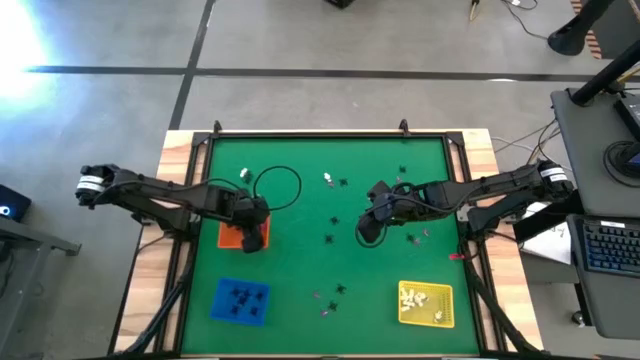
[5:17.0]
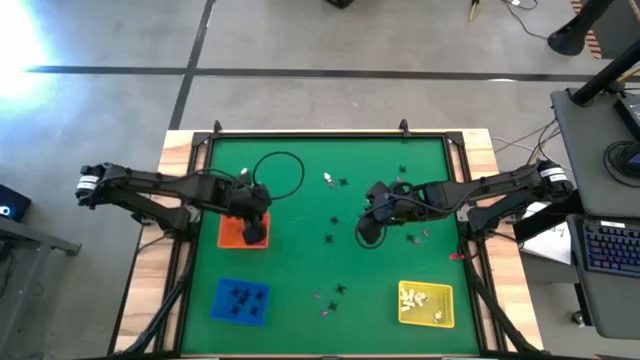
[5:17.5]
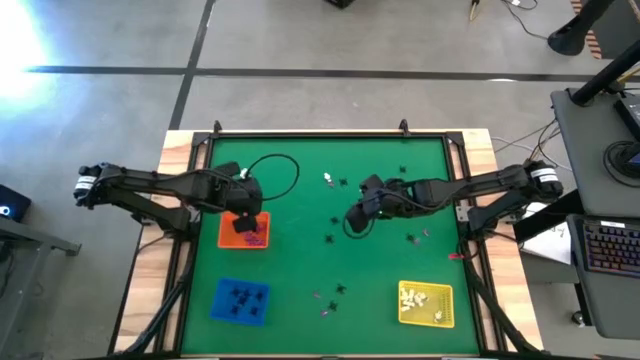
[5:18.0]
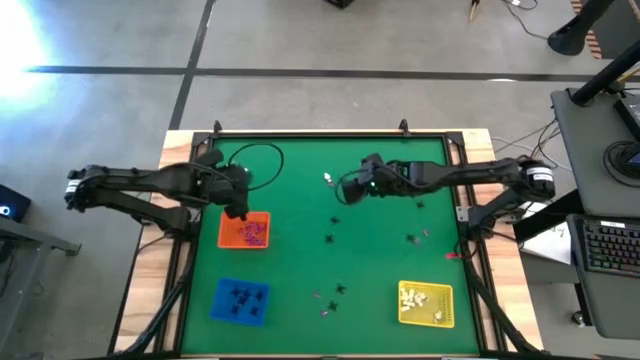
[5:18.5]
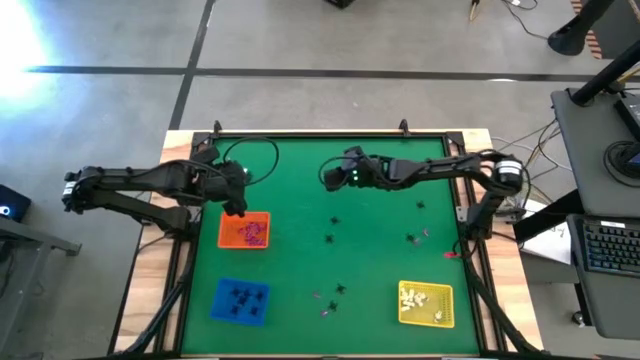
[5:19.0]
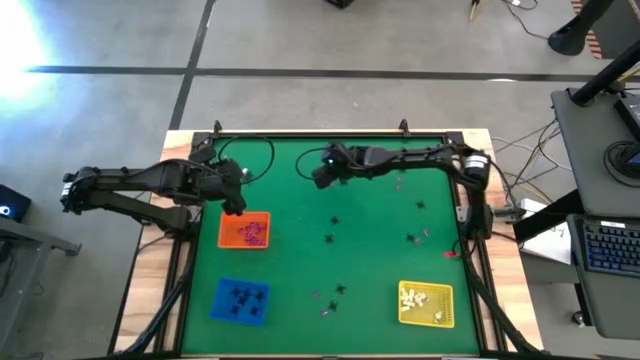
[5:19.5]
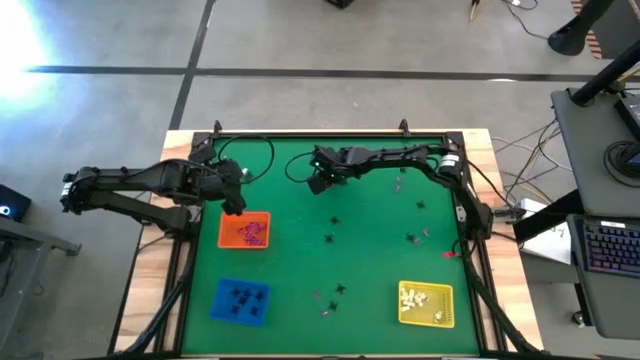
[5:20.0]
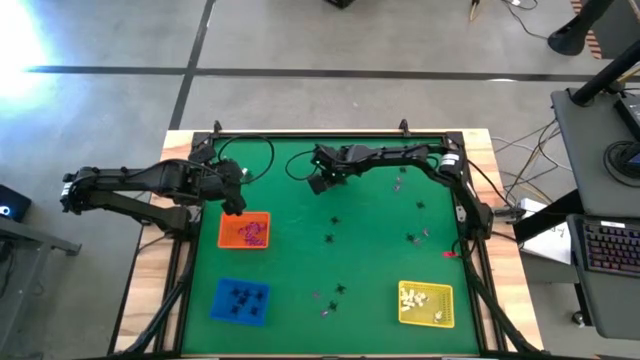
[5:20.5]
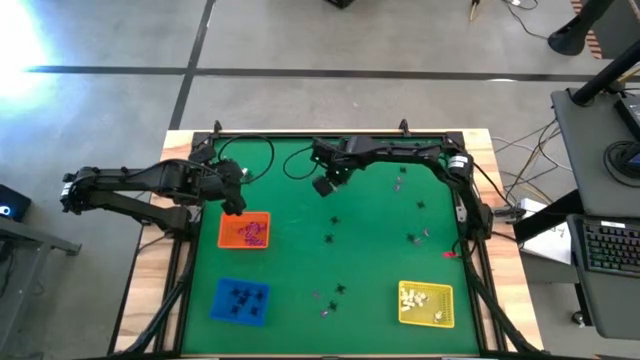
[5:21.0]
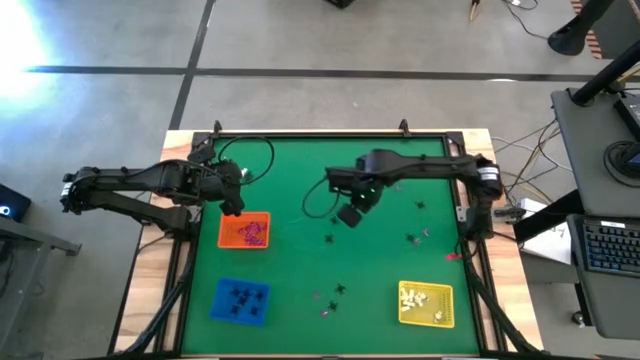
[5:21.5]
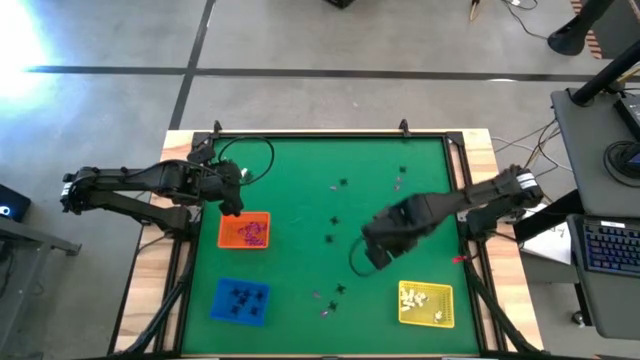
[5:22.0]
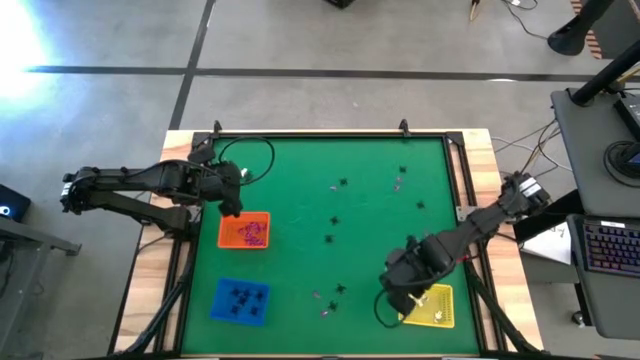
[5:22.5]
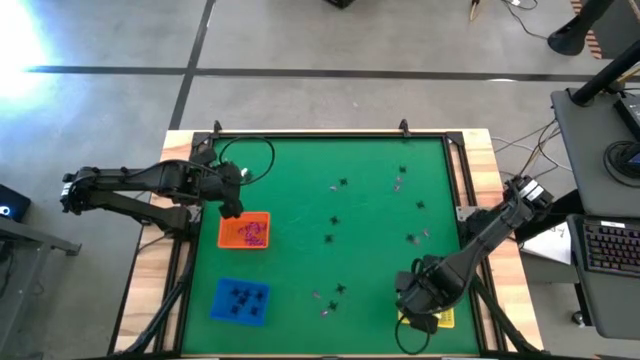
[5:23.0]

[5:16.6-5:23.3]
Task: Sort Halloween decoration
Put the white skeleton toy into the yellow bin

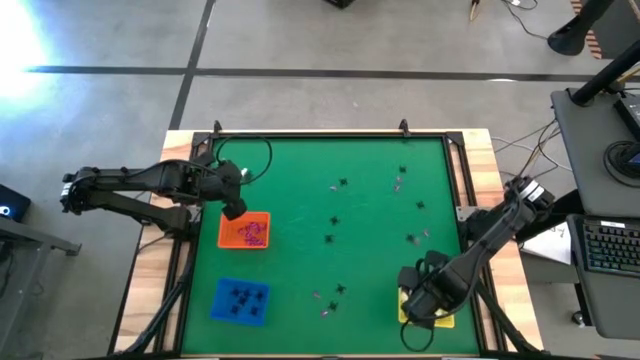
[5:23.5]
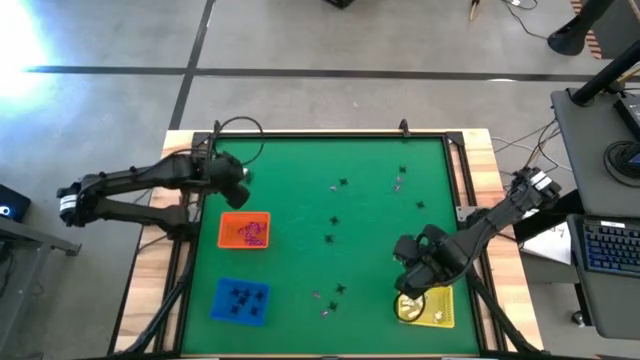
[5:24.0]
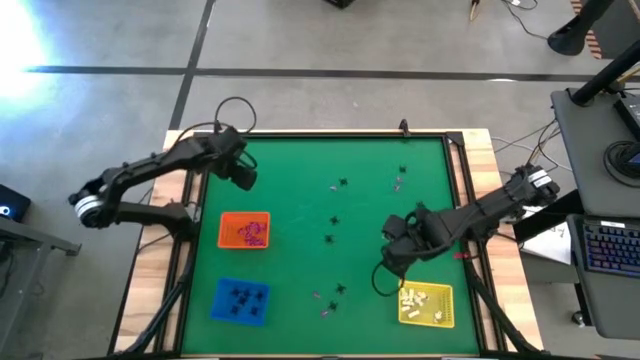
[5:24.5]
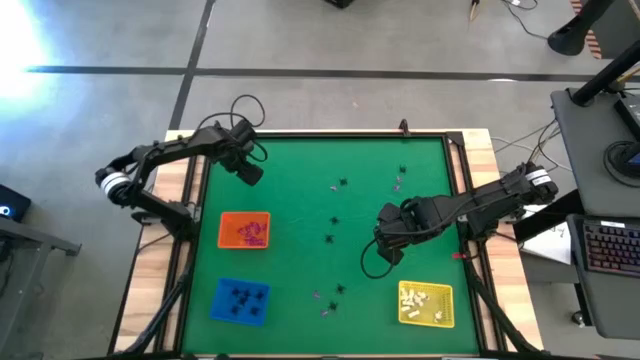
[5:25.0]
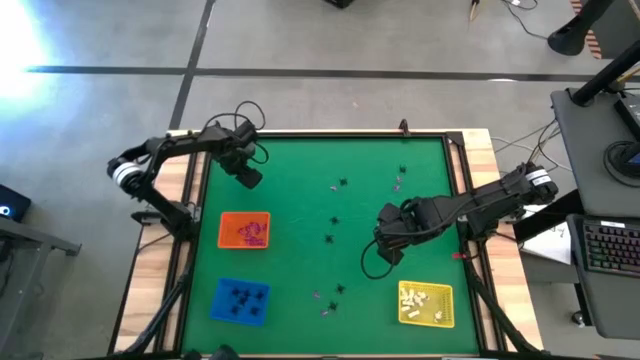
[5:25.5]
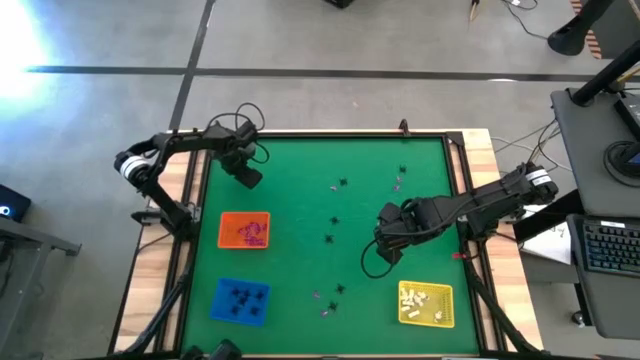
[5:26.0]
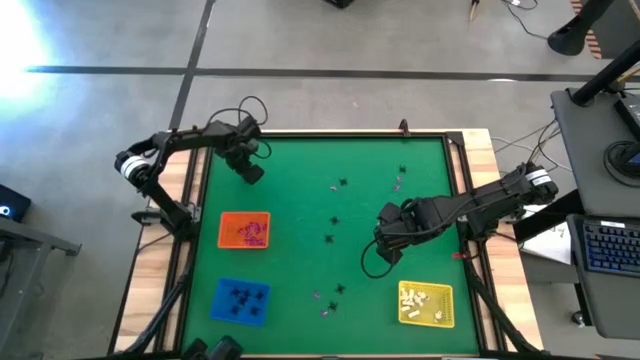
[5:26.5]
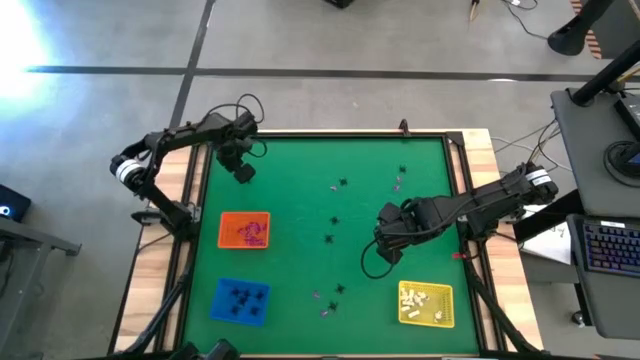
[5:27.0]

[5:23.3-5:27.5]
Put the white skeleton toy into the yellow bin

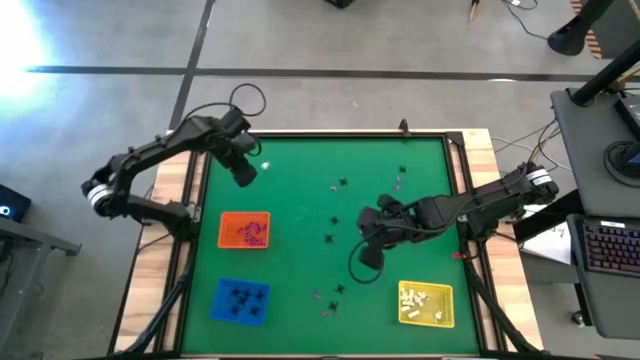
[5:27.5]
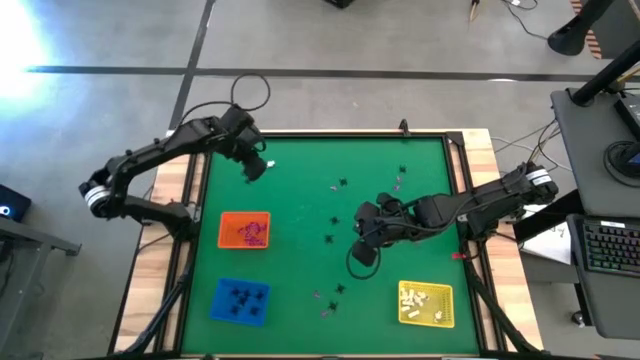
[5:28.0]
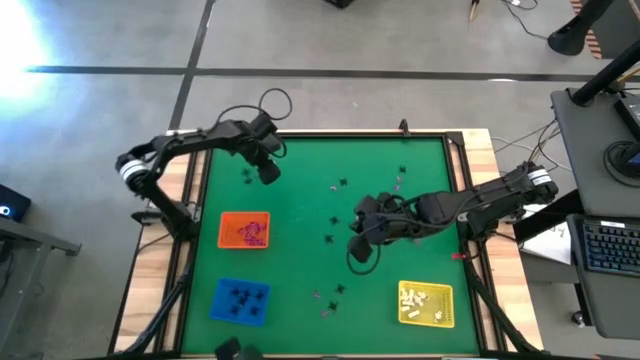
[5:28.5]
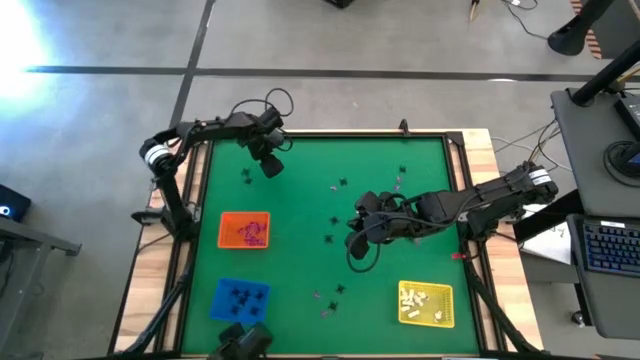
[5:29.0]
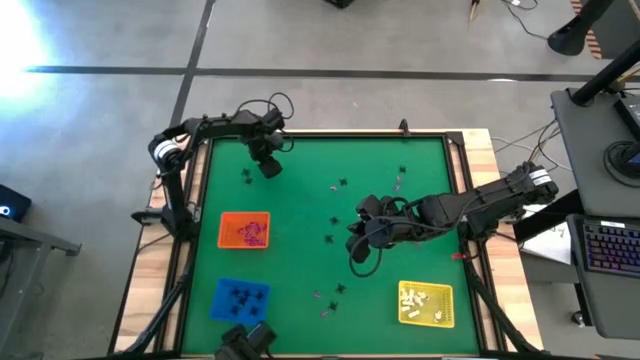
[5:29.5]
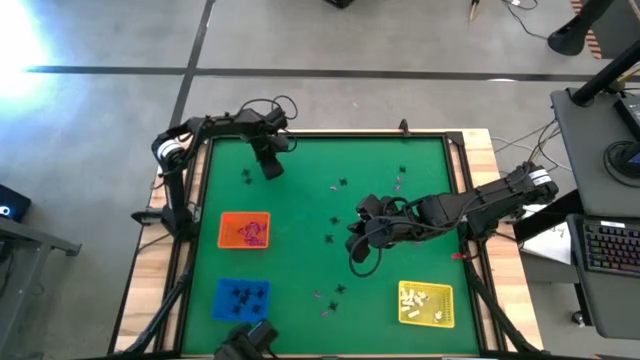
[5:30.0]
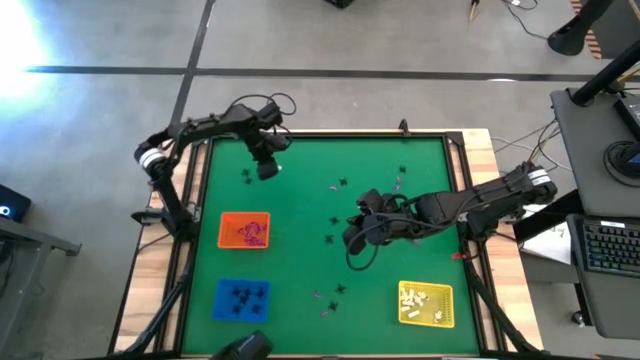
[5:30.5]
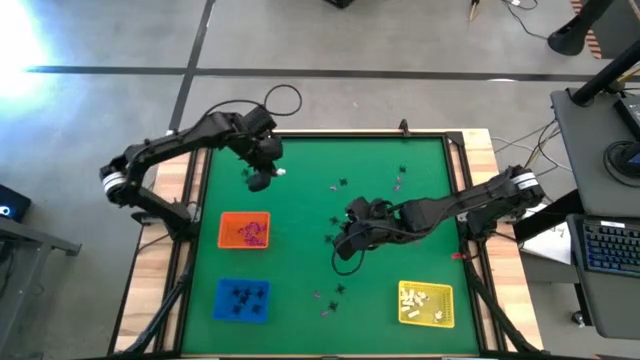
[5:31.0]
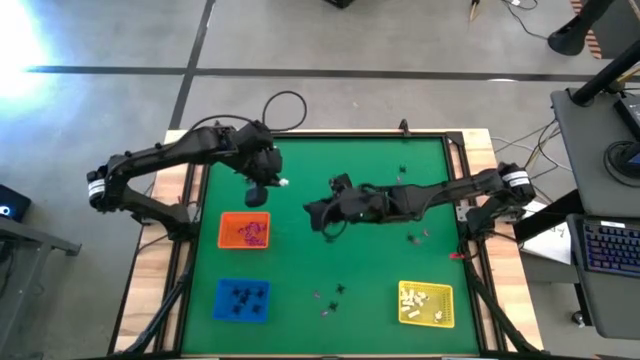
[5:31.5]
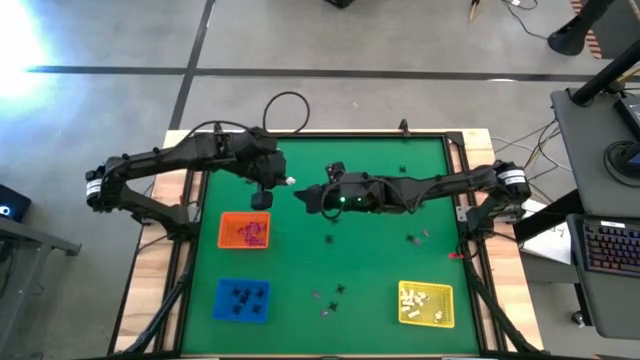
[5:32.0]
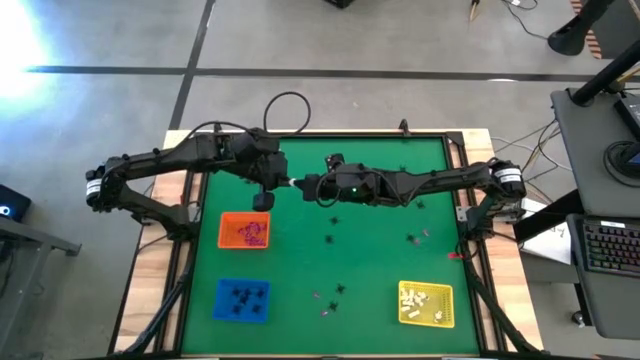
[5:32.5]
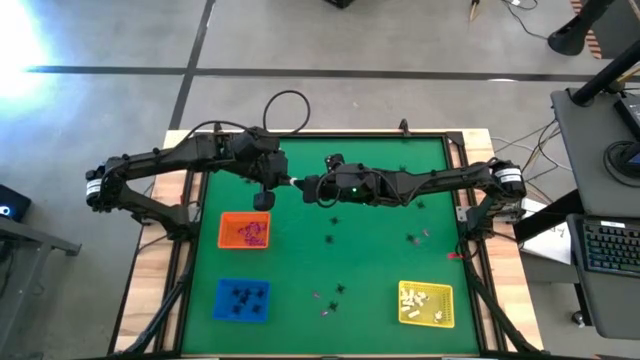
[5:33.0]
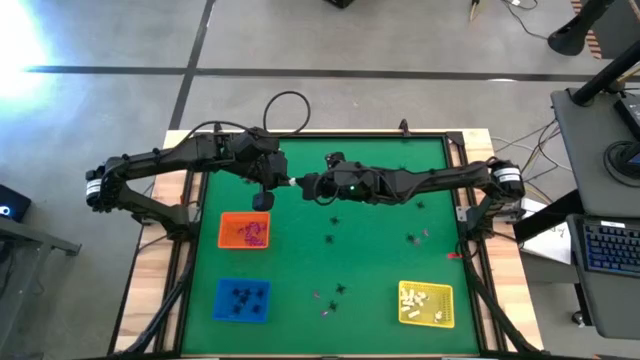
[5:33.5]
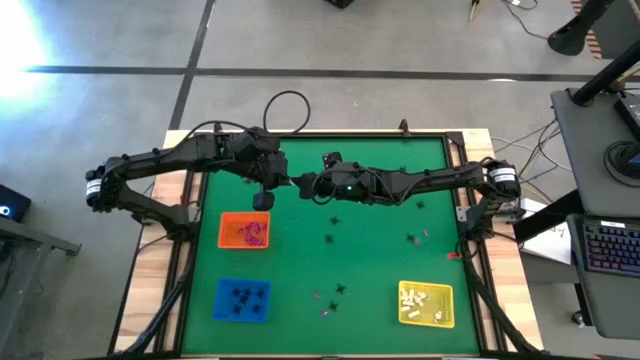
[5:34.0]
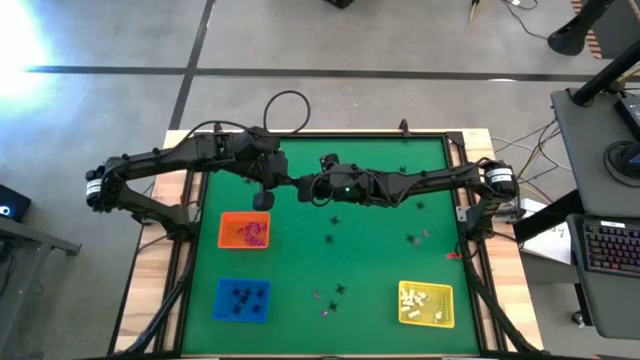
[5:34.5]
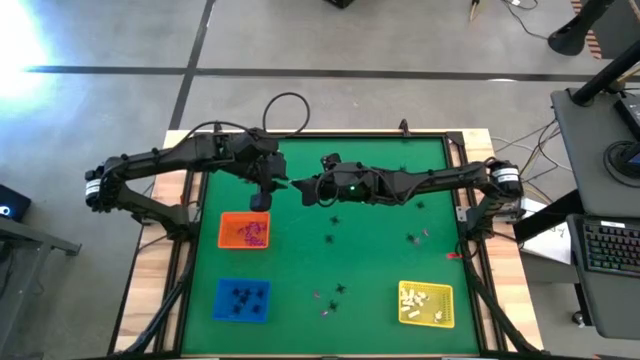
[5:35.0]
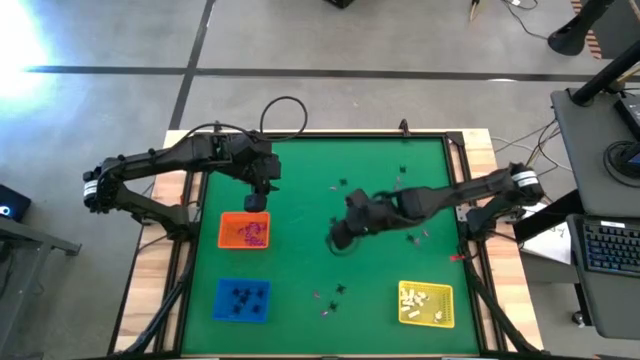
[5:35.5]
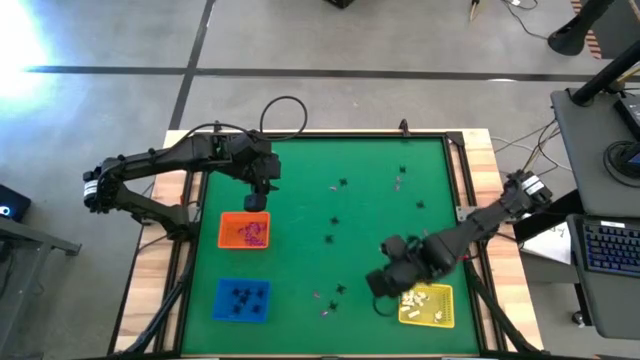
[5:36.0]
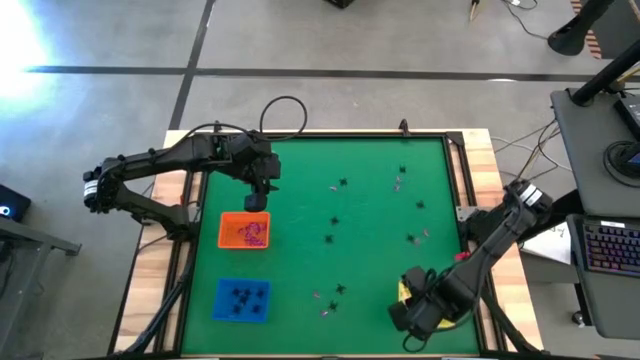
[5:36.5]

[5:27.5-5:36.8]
Put the white skeleton toy into the yellow bin

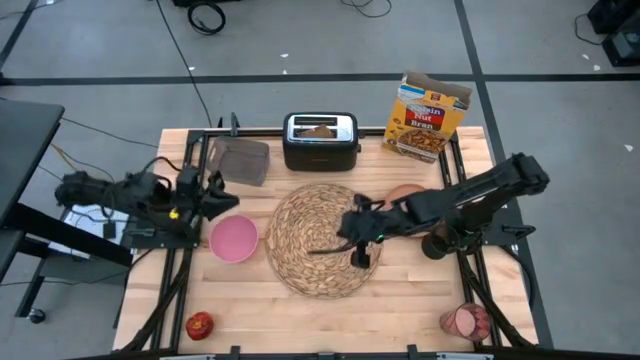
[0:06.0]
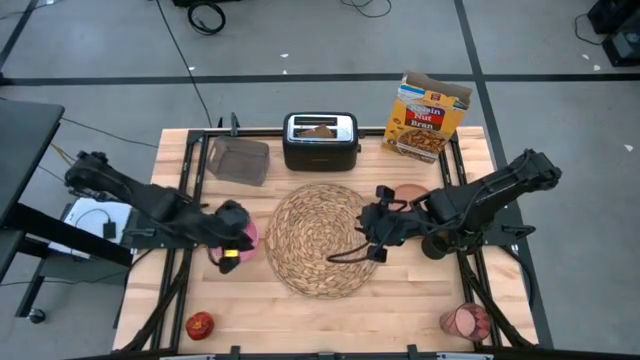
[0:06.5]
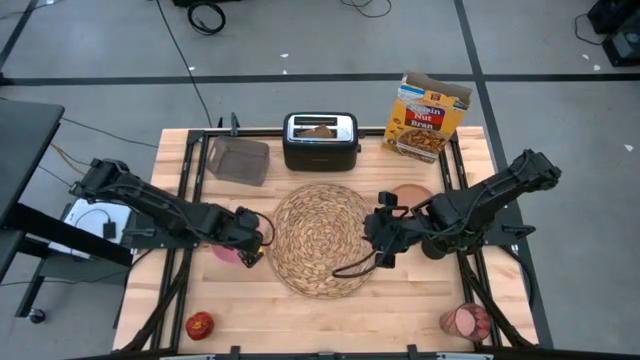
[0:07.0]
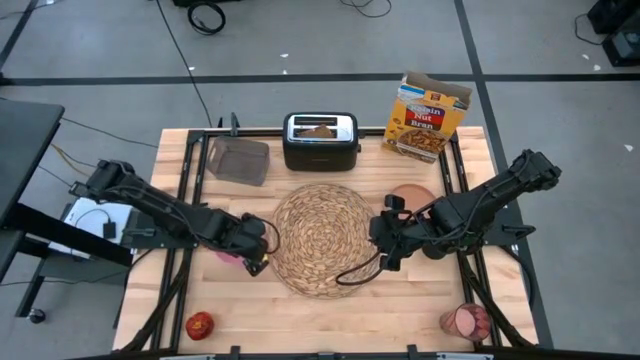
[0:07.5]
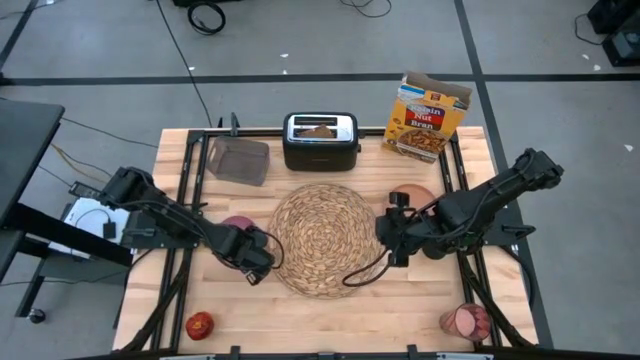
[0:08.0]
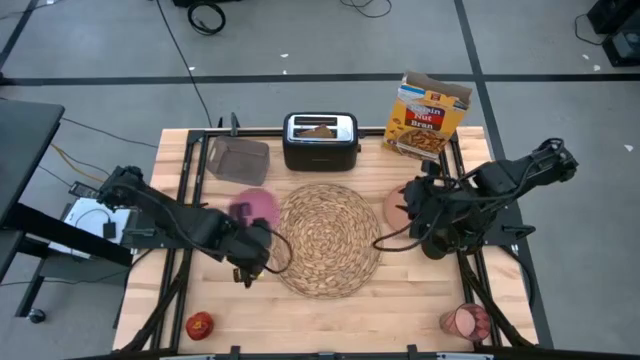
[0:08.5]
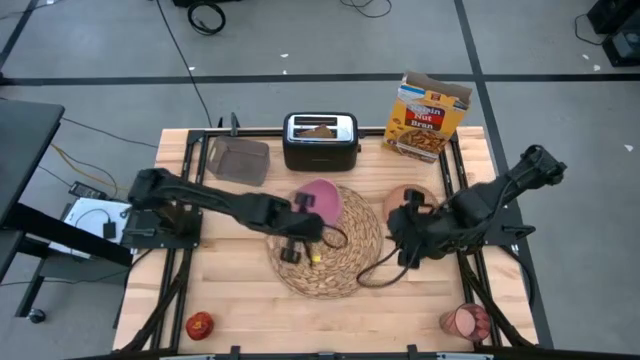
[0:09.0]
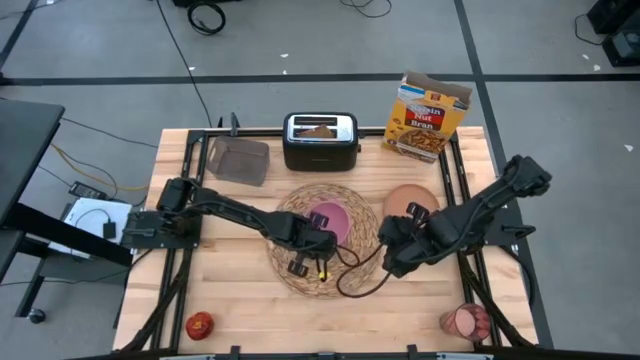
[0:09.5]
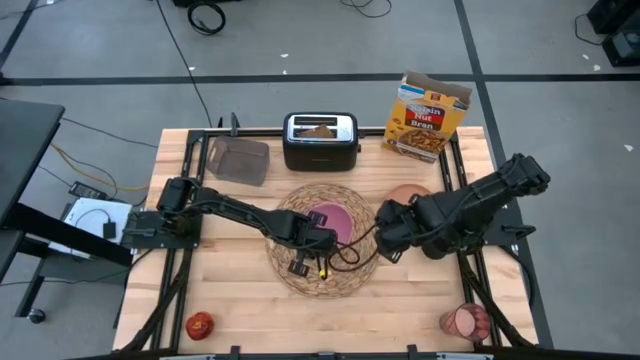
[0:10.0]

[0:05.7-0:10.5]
Task: Arrange a breakfast setting
Put the pink bowl on the brown placemat
